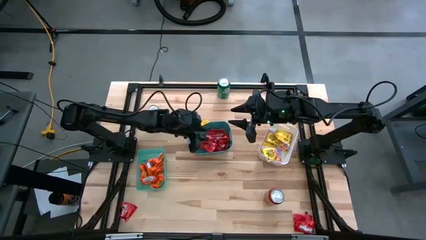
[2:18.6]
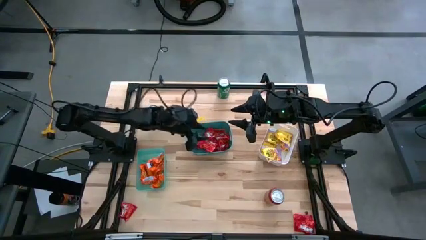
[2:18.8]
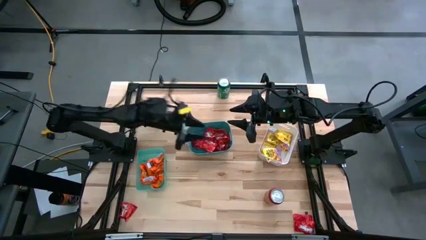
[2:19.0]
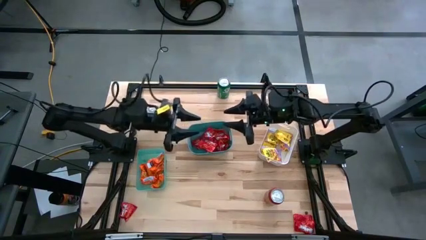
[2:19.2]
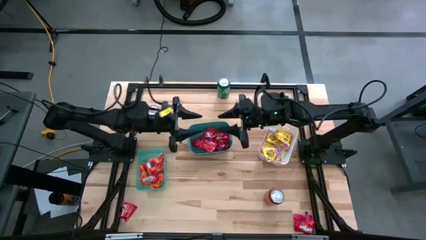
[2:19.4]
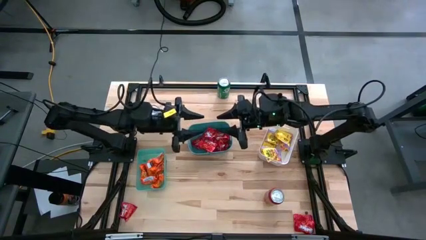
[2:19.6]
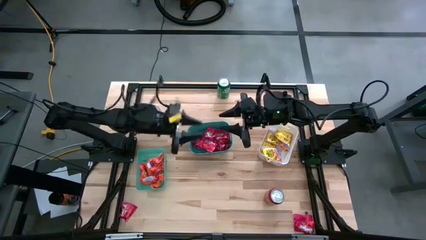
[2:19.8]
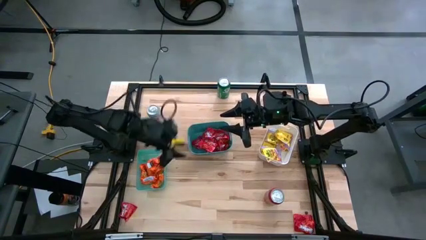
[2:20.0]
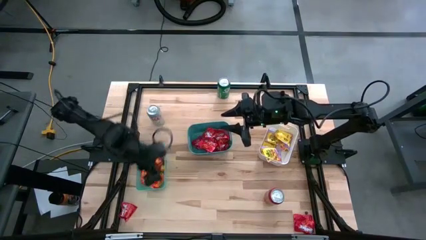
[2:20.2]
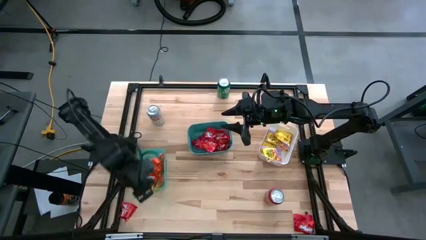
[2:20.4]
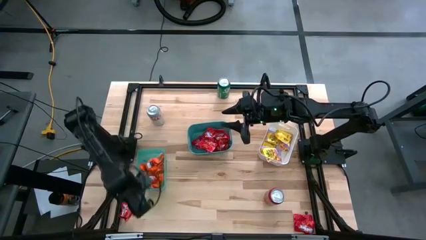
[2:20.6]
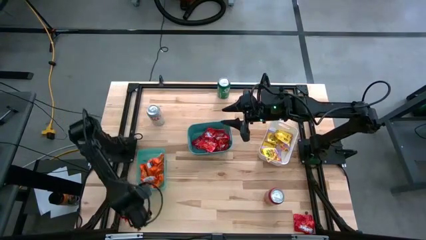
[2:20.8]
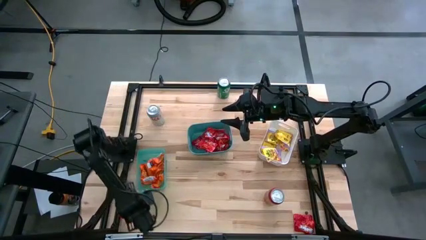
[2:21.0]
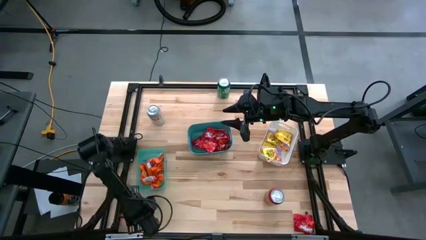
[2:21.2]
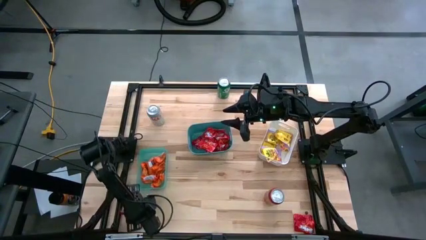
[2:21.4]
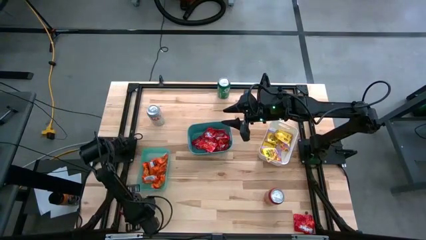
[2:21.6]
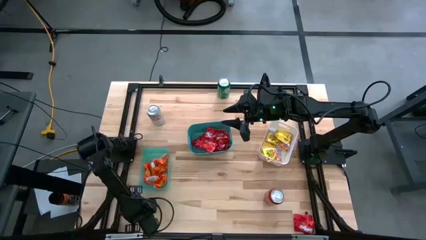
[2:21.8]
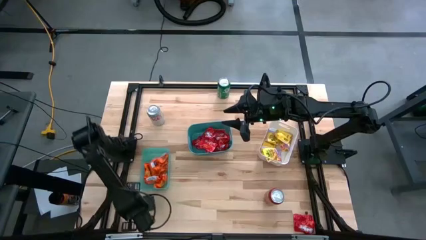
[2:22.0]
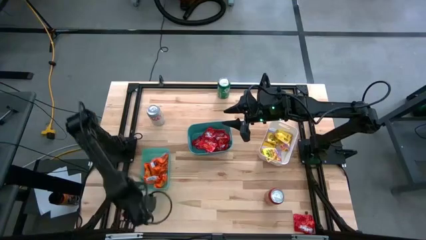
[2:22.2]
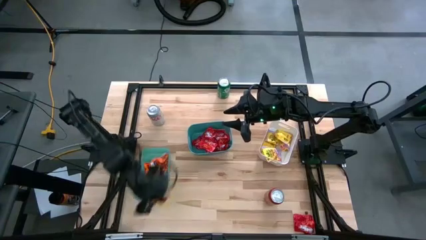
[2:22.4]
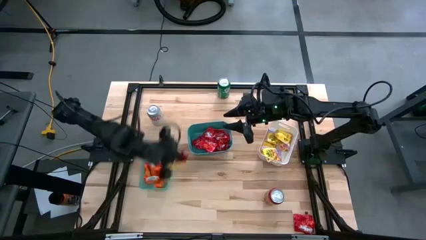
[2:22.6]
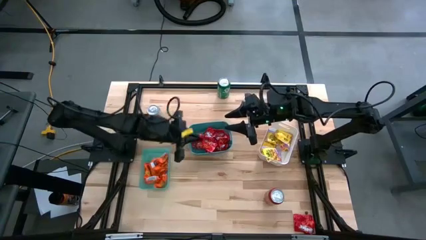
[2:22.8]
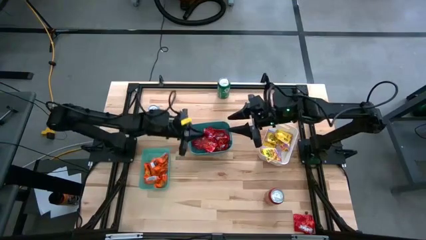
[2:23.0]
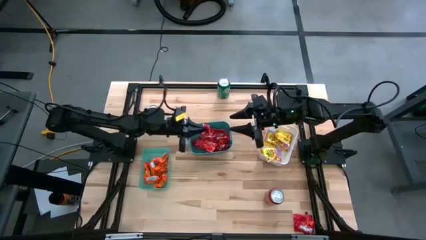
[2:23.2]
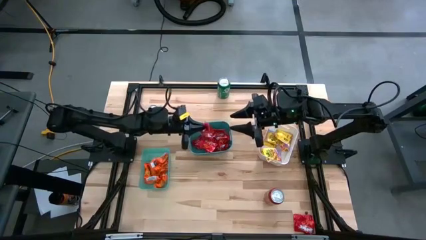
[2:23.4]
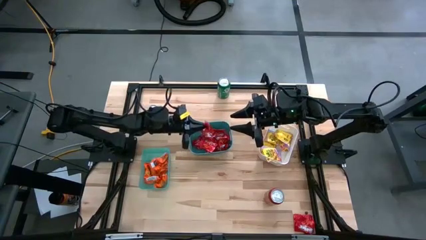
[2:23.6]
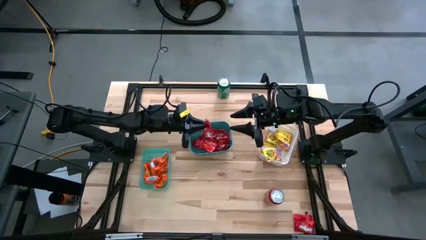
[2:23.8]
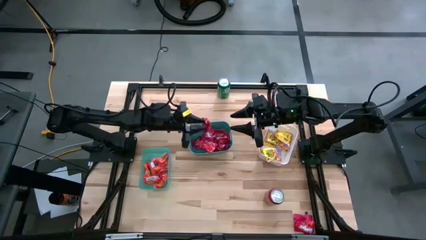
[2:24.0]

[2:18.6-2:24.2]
Task: Sort candy
Put the red candy into the green bin

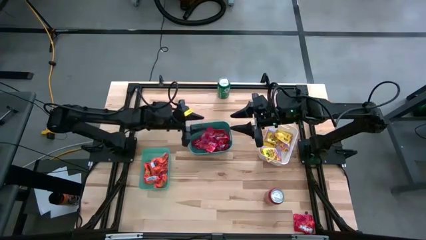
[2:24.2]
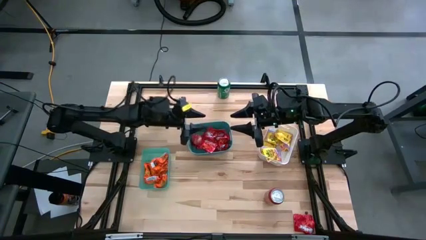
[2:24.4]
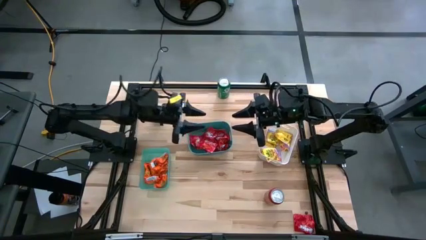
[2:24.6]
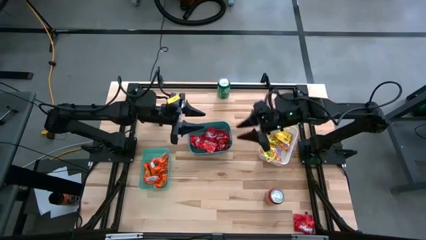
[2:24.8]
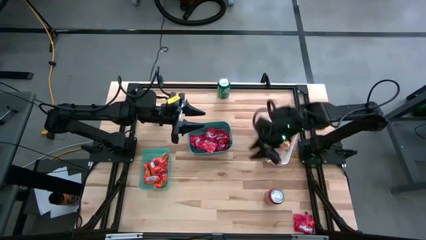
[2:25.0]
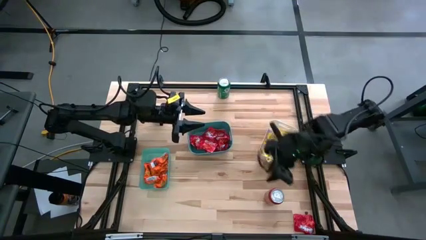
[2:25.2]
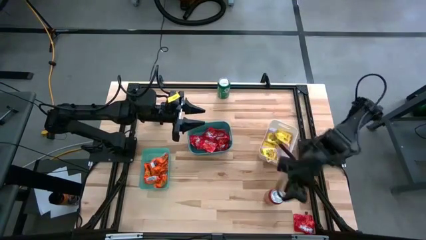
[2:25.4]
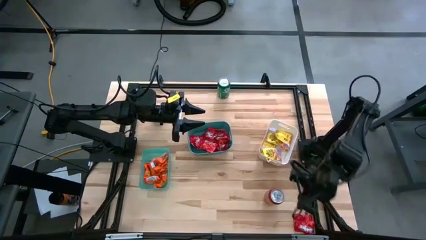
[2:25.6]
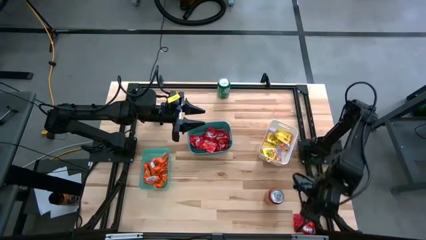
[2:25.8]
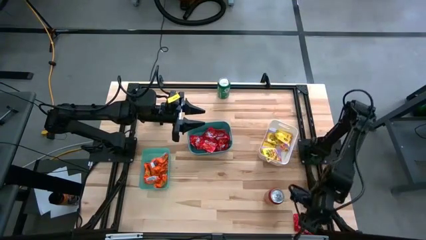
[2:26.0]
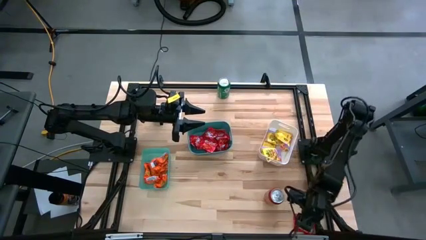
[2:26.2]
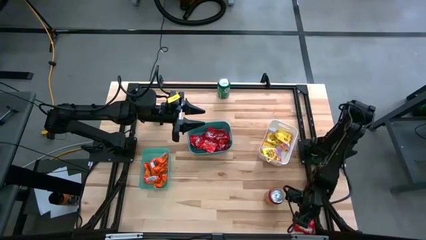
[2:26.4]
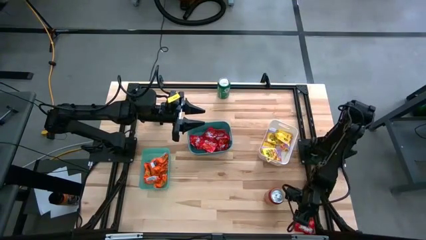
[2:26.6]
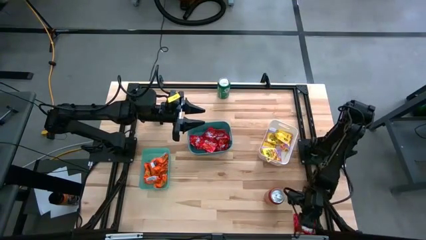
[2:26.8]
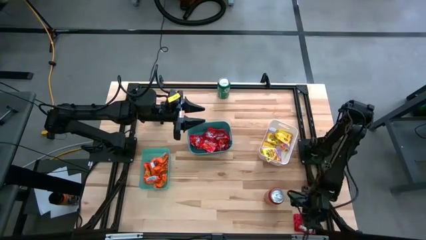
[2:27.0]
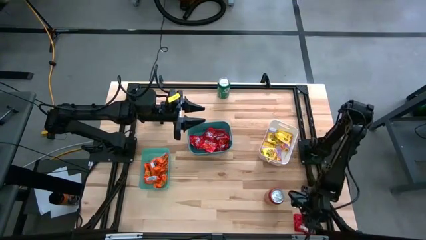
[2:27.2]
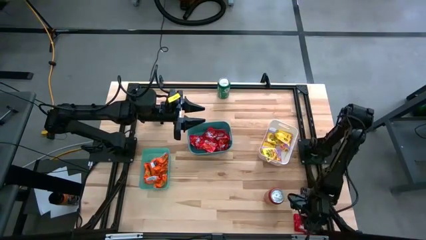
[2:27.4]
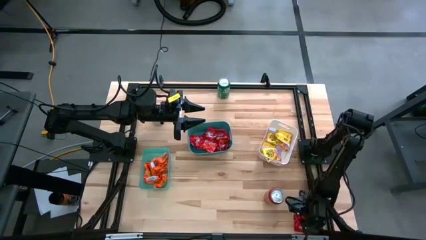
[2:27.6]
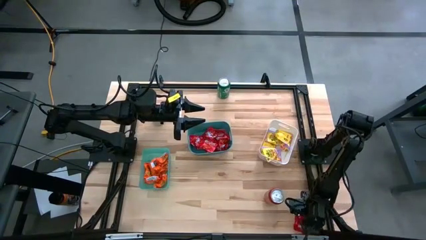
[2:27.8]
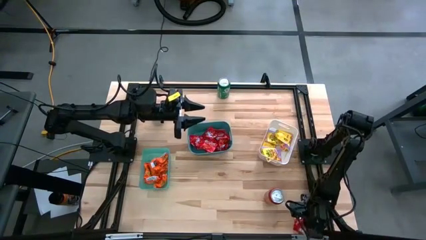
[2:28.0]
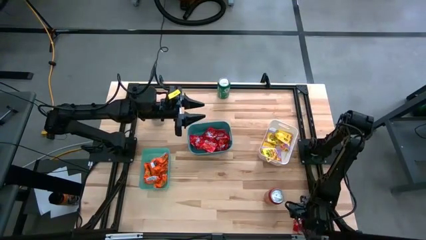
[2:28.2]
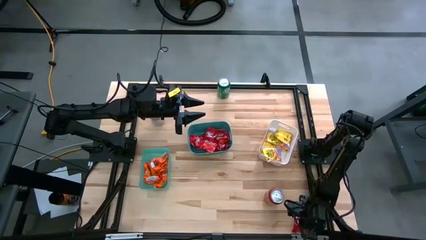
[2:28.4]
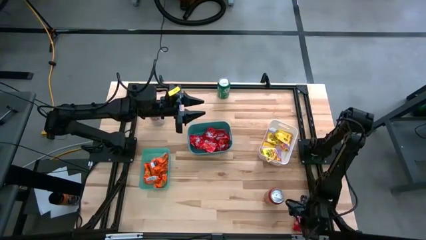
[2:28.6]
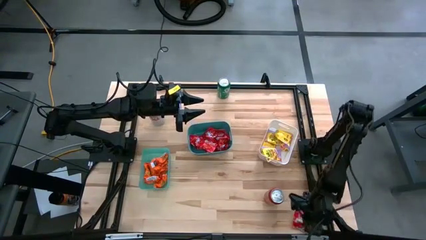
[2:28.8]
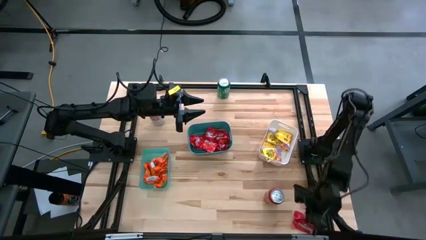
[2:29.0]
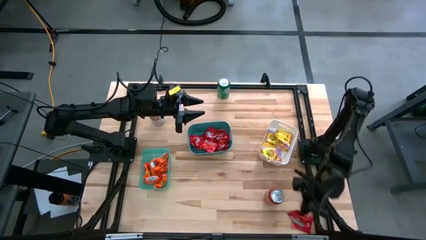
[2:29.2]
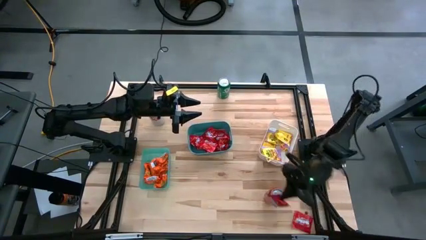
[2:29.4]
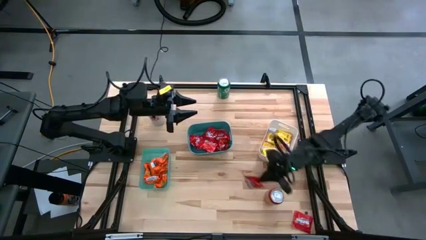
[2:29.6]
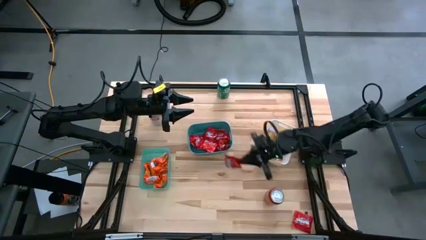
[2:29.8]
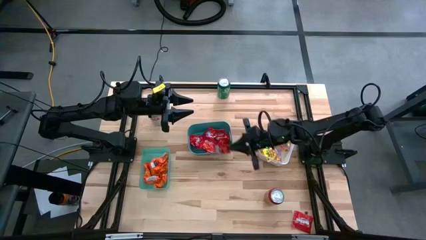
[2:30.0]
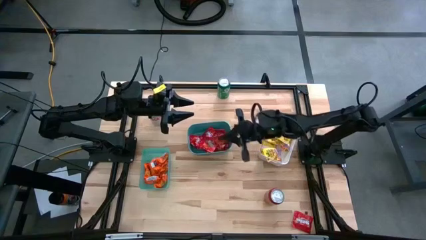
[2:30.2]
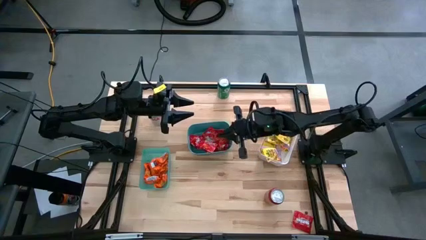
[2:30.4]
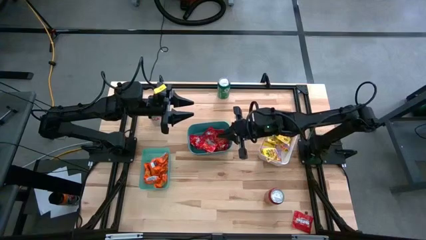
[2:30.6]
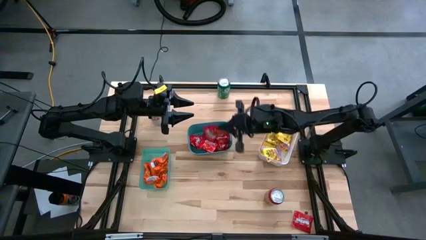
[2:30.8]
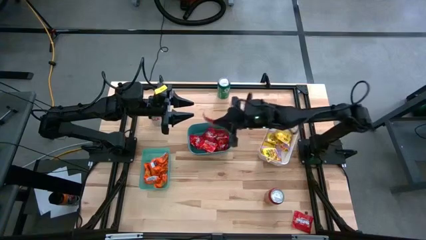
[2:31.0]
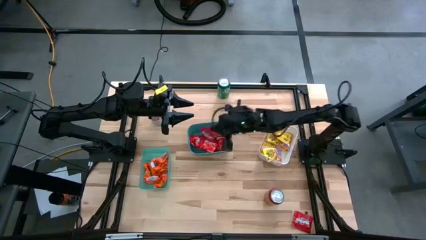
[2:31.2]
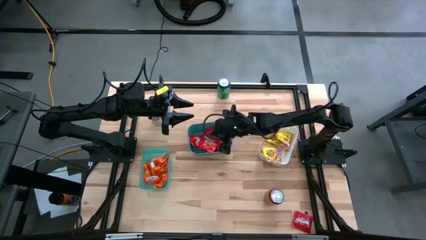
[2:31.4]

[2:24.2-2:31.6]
Put the red candy into the green bin

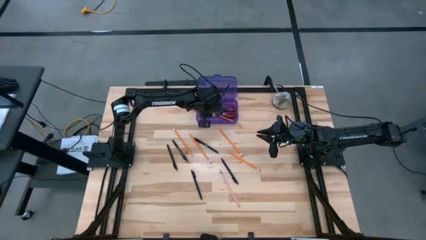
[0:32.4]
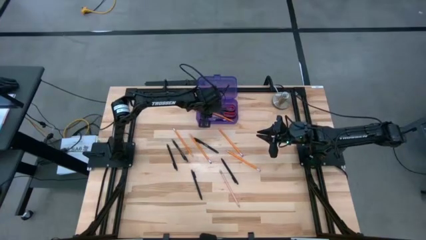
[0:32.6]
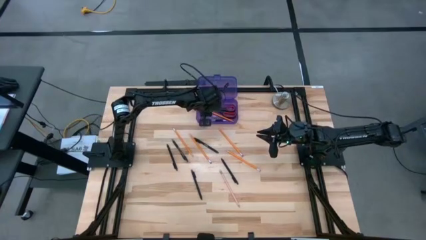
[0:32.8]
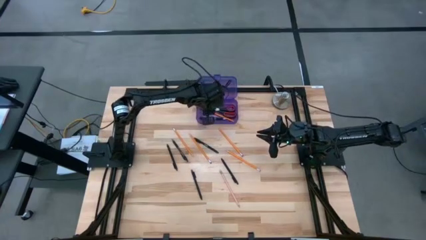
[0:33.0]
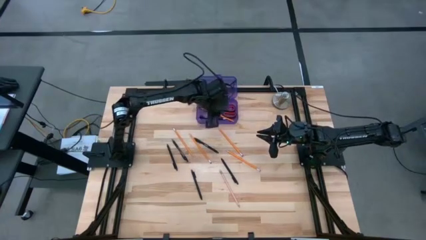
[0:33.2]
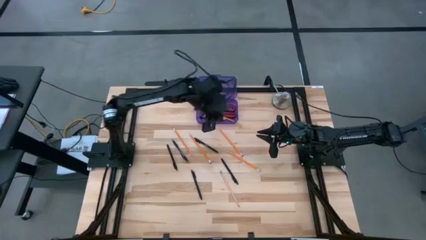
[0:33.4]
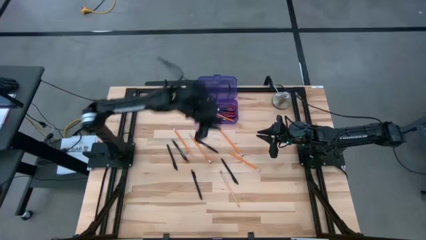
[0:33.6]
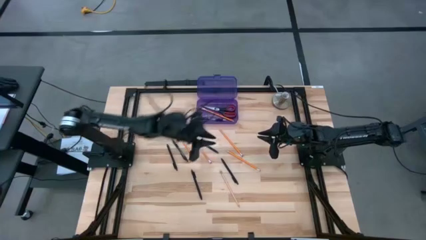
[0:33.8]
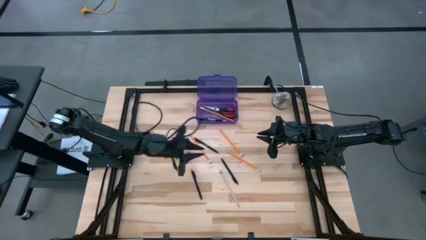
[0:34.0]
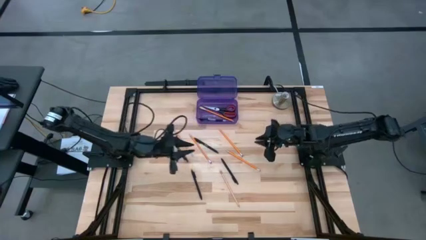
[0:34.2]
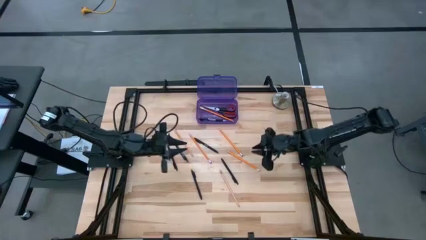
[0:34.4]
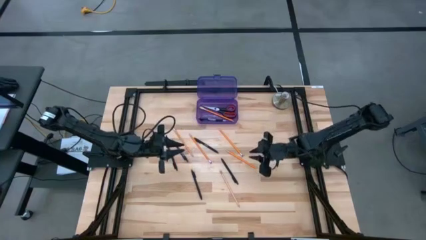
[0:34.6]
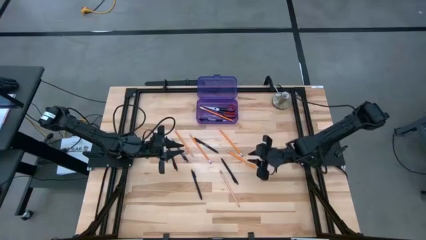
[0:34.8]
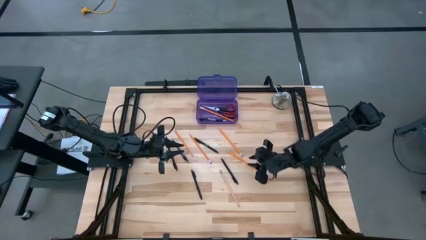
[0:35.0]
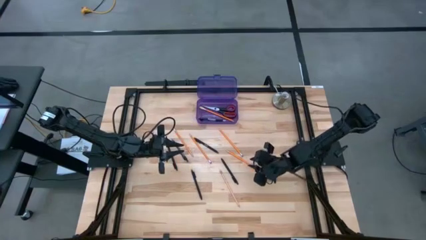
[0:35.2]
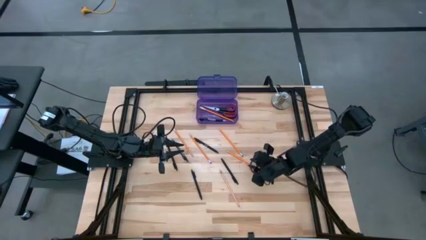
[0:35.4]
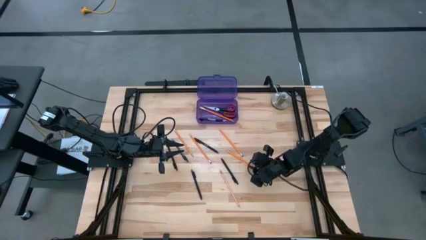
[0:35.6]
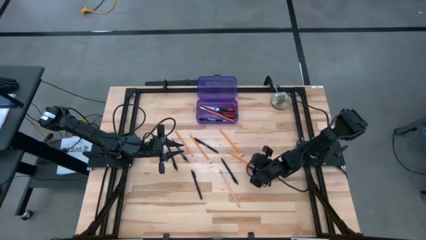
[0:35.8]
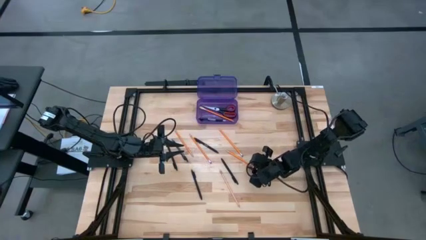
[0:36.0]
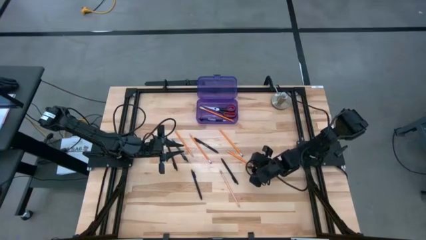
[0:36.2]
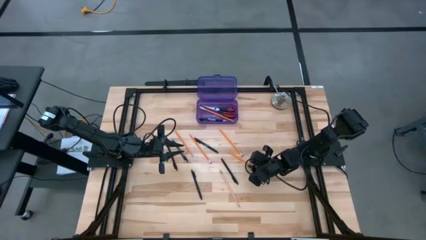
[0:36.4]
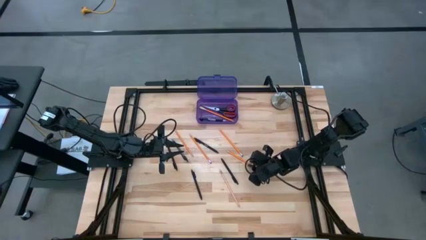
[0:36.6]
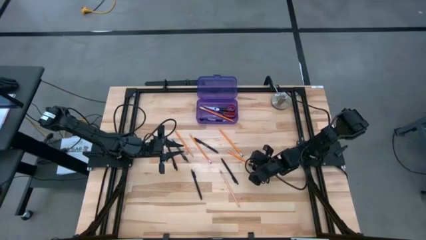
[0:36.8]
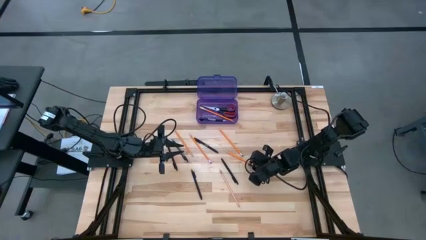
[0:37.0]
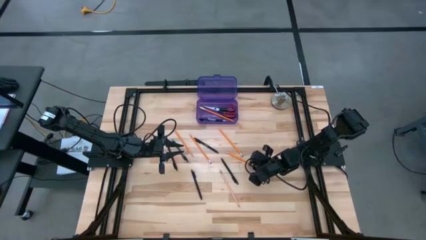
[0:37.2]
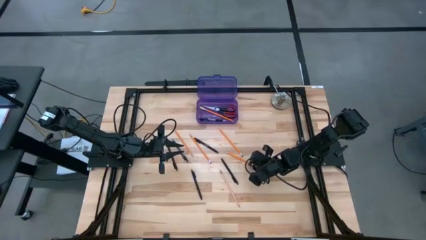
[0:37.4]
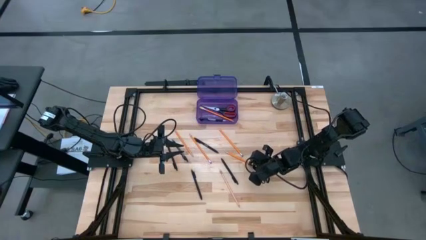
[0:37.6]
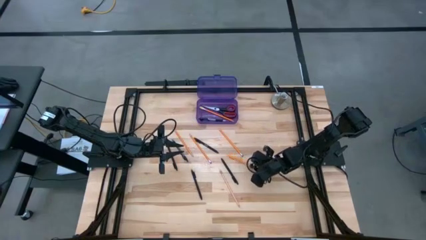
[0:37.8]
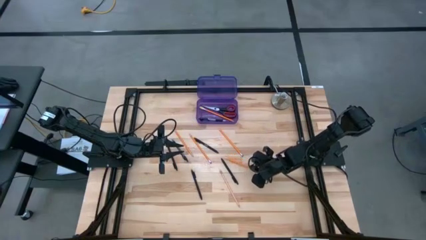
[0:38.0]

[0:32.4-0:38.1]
Task: Pick & place school supplies into a supply box
Put the yellow pencil into the violet supply box
